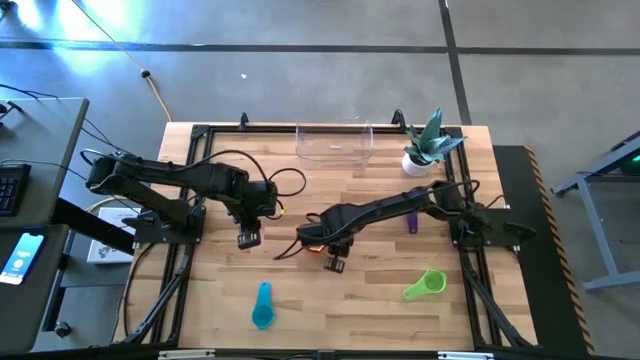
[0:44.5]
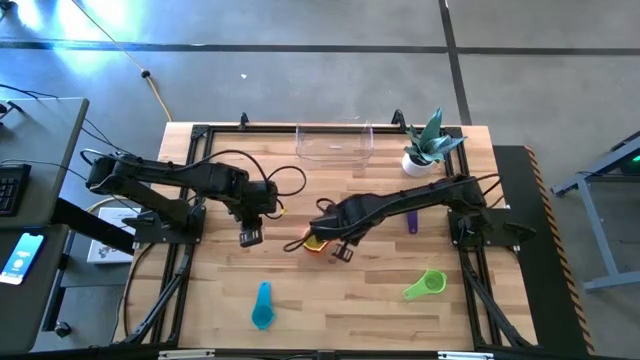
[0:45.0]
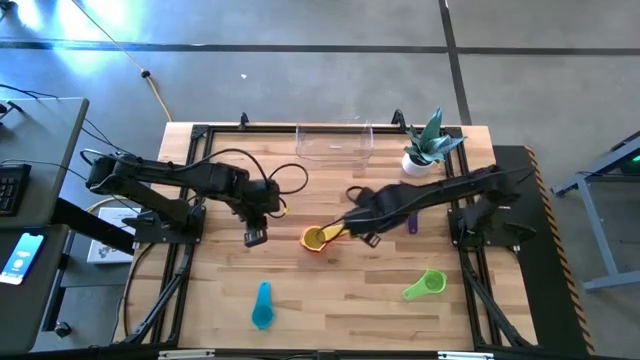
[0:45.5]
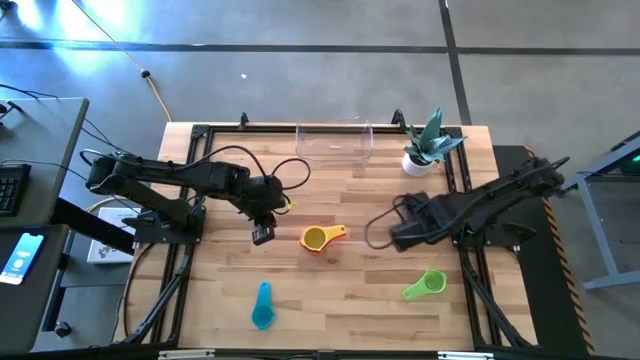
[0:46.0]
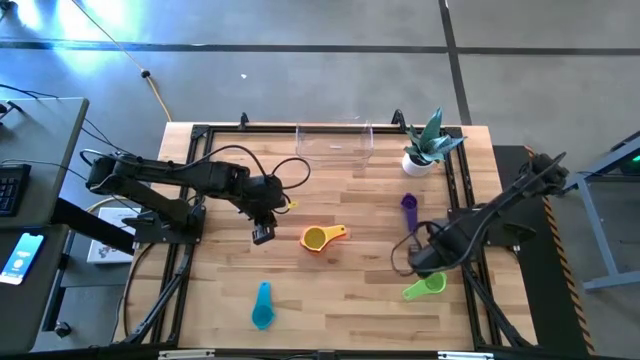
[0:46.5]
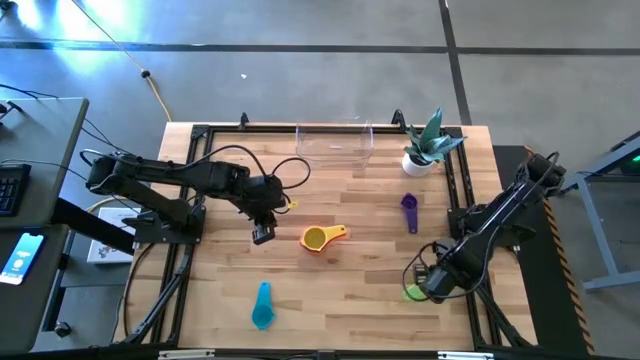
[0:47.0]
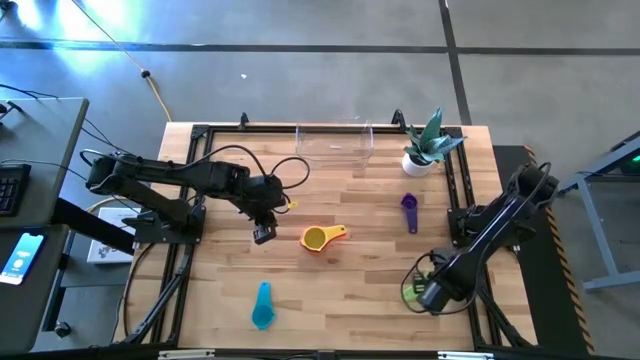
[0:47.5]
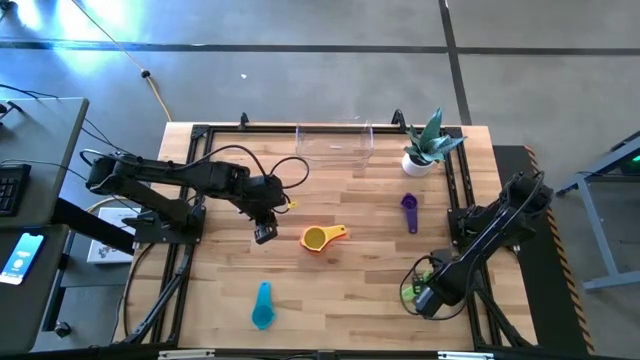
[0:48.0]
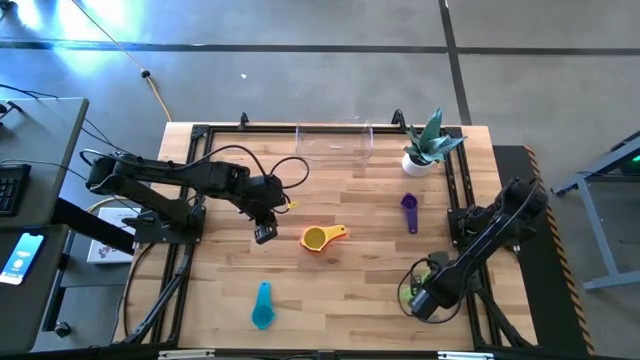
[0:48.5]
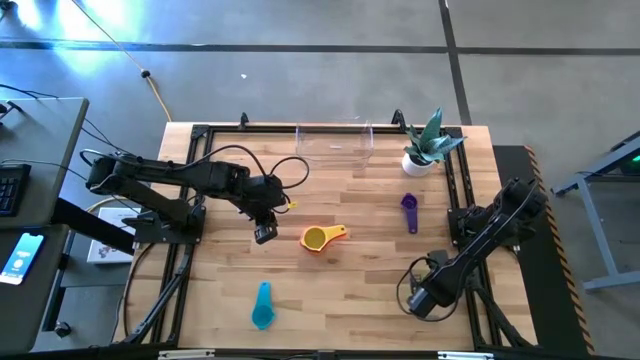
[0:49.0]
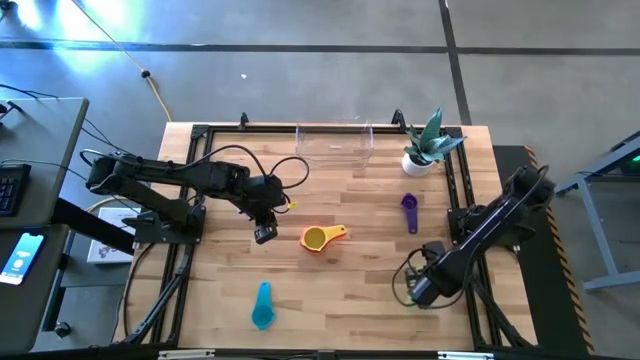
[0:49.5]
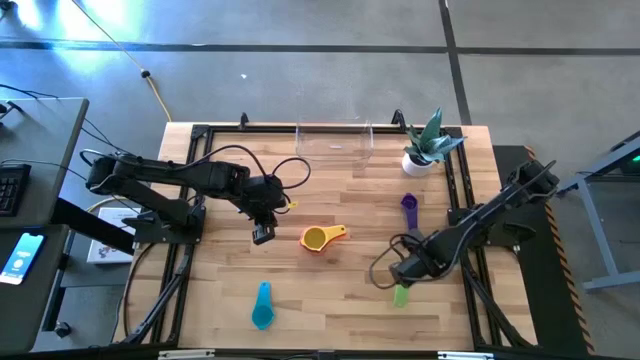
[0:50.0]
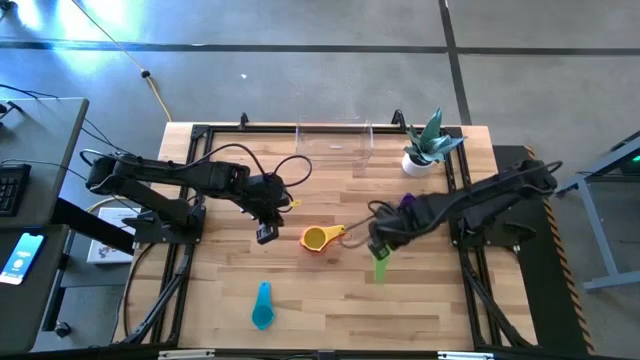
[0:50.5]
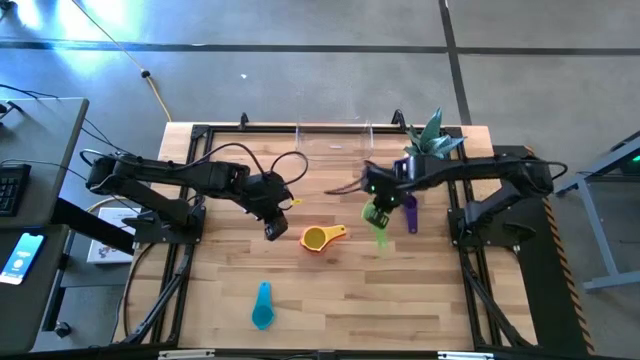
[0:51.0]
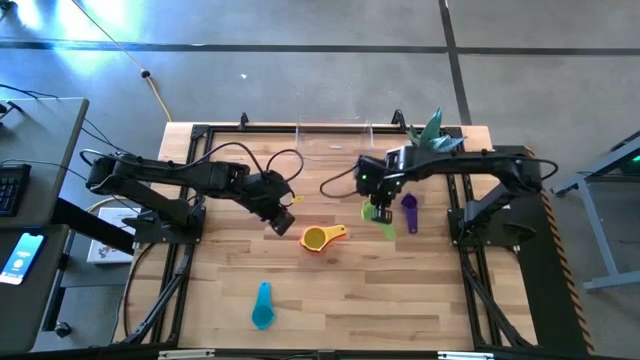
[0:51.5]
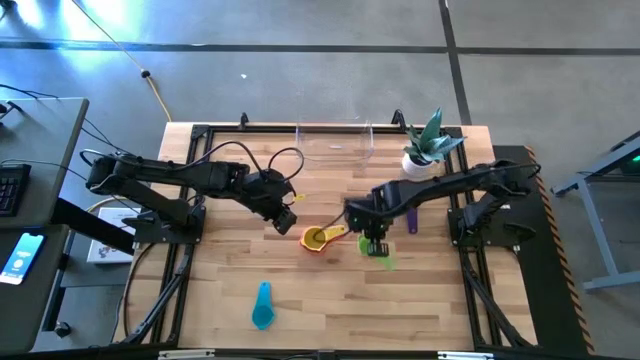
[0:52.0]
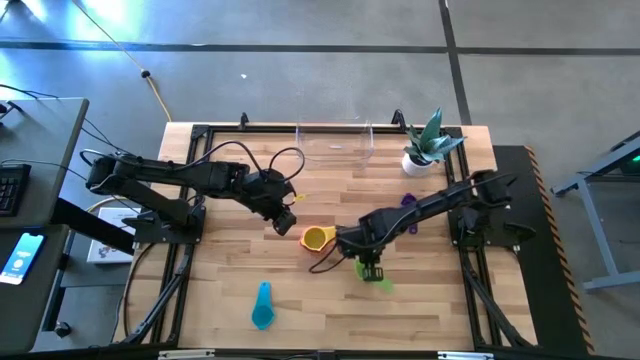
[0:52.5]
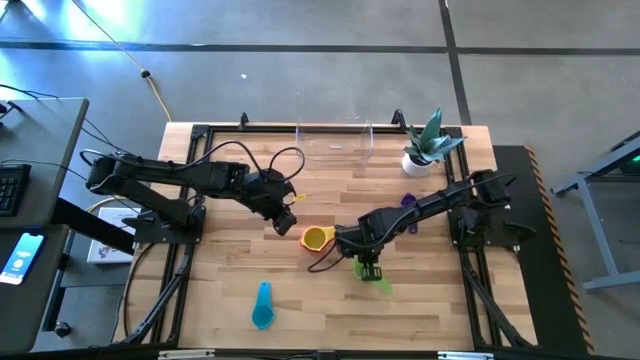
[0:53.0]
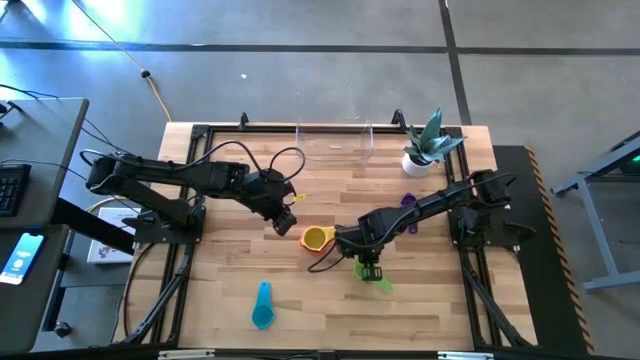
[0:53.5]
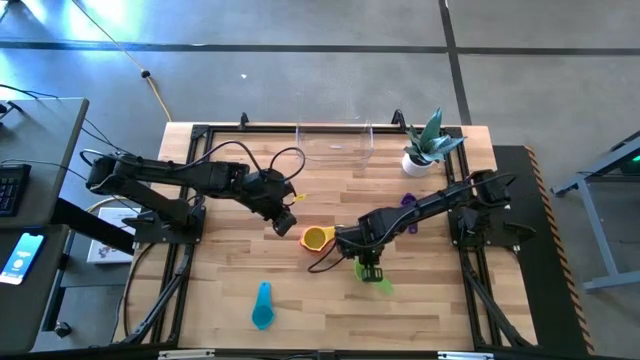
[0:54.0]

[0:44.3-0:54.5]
Task: Nest measuring cups in basket
Move the green measuring cup to the center

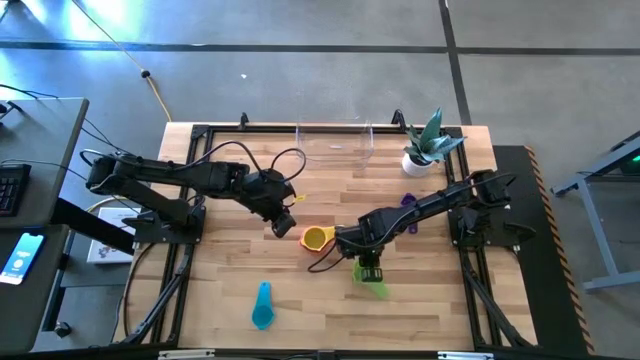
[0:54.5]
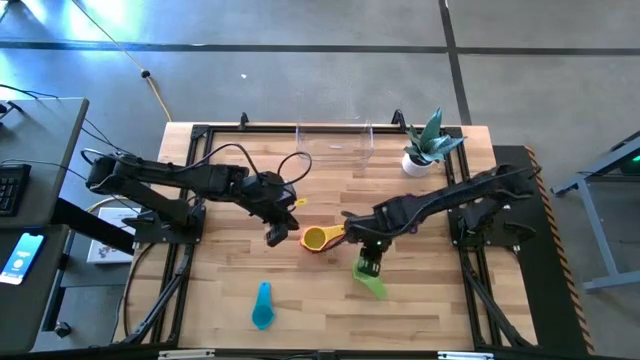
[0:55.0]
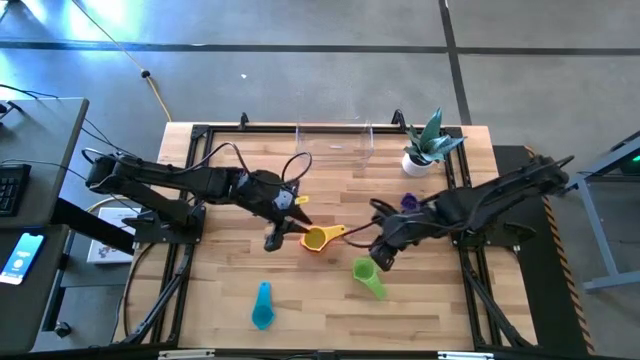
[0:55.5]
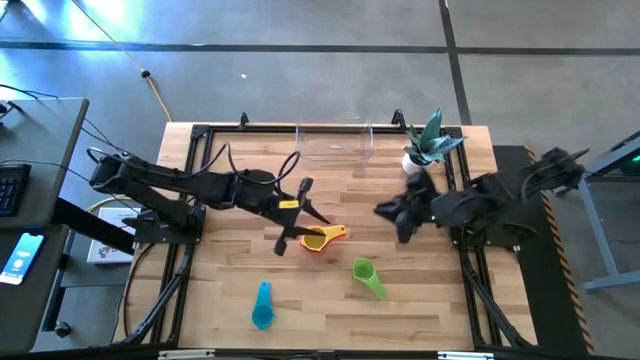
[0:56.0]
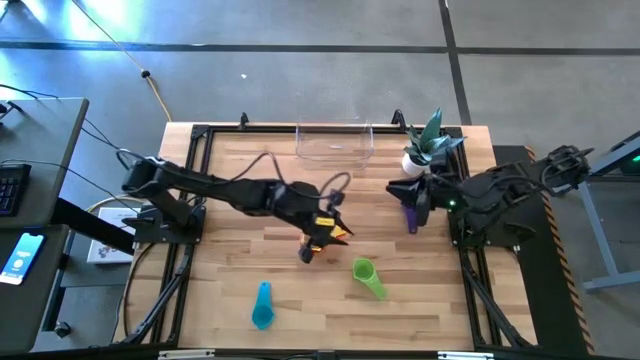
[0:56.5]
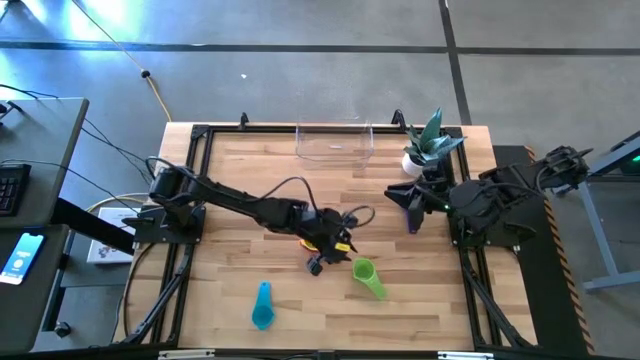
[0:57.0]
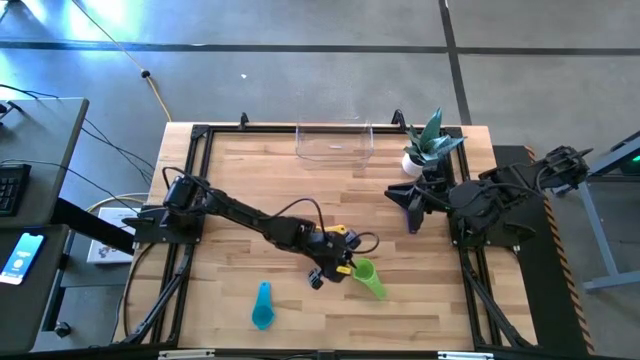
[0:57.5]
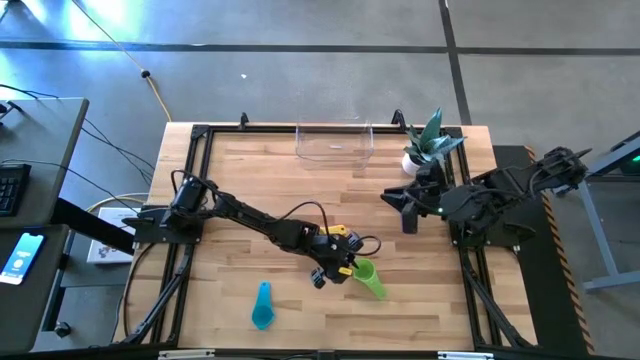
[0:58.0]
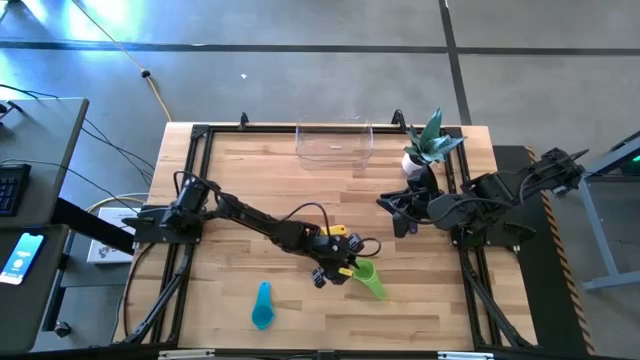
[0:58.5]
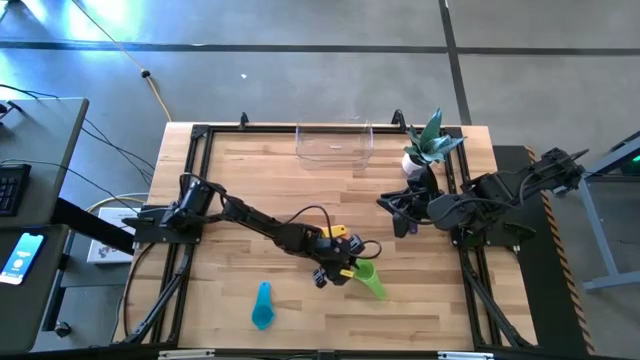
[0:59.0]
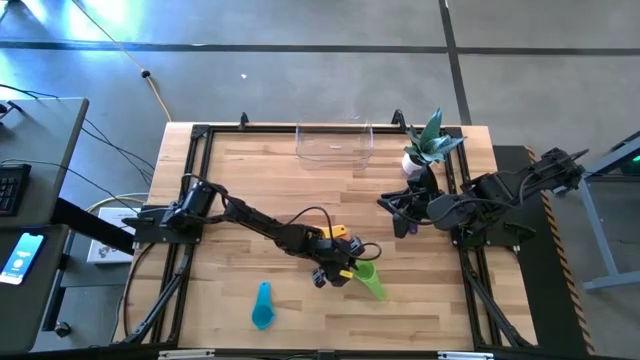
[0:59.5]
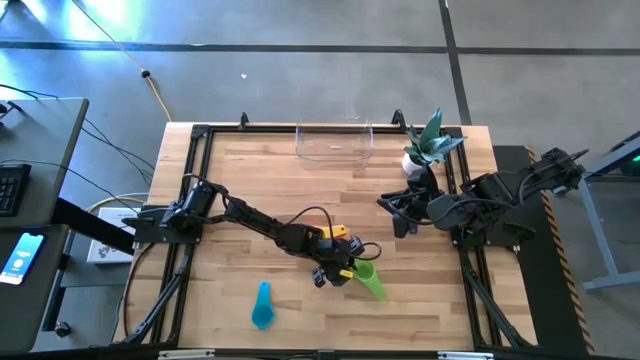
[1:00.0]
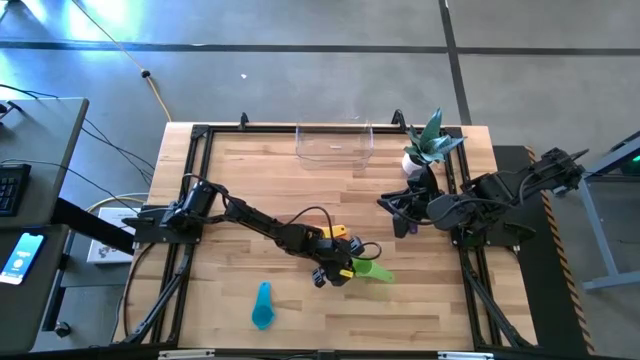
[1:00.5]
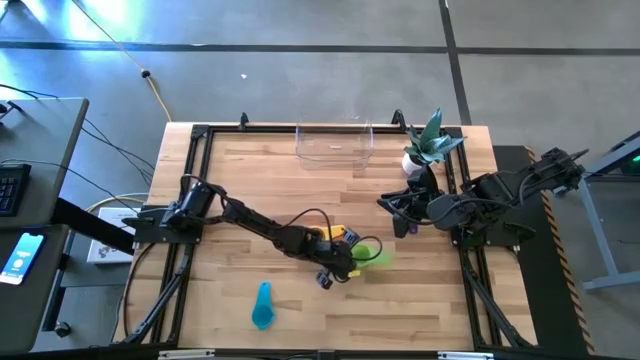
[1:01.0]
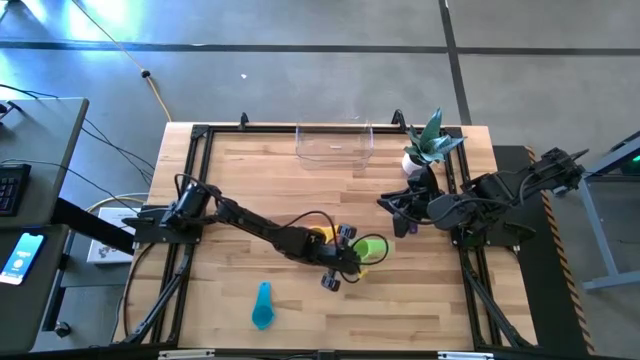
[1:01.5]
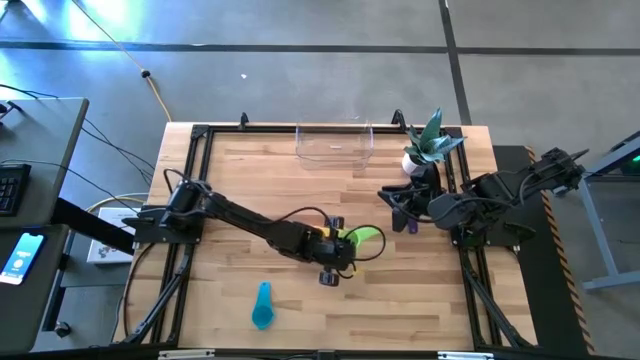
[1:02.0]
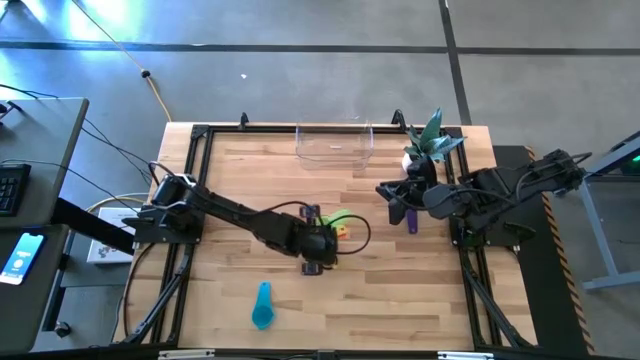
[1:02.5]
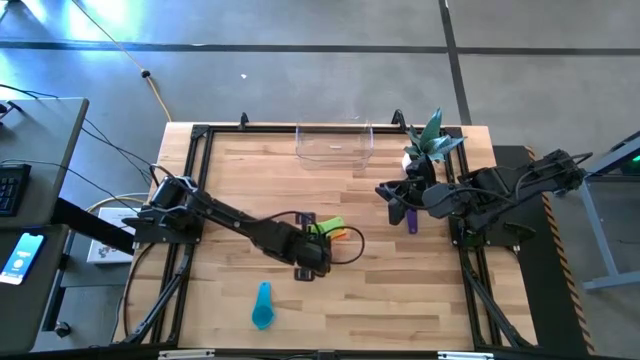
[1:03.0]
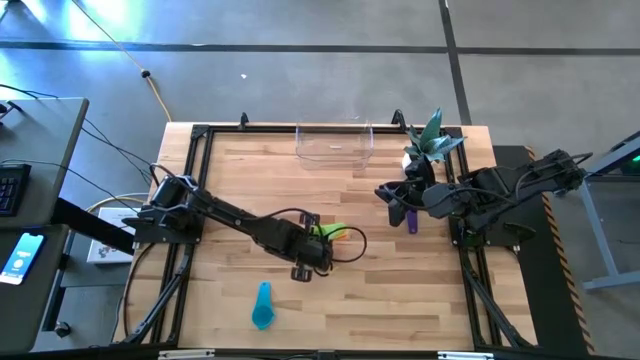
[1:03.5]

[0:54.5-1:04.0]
Stack the green measuring cup on top of the yellow measuring cup

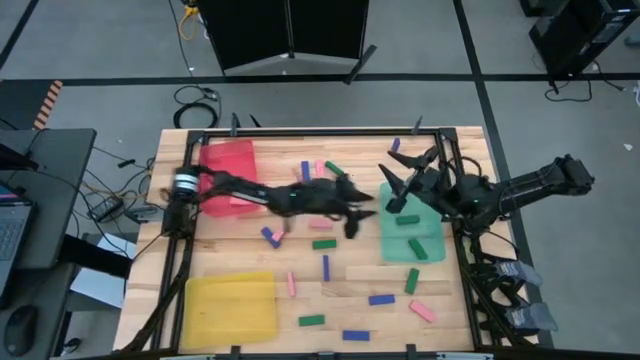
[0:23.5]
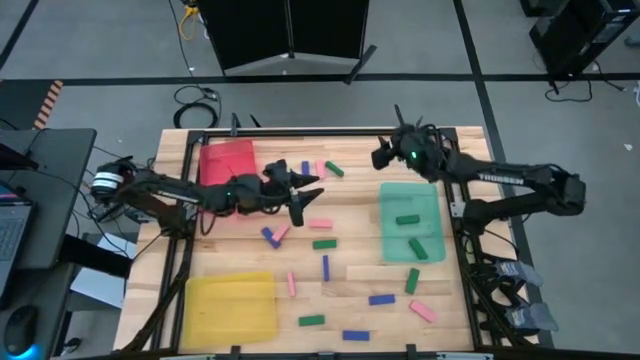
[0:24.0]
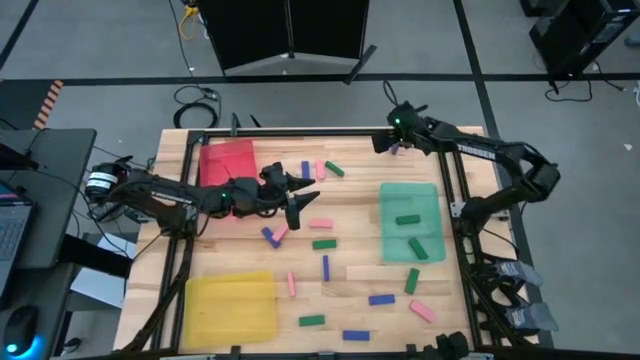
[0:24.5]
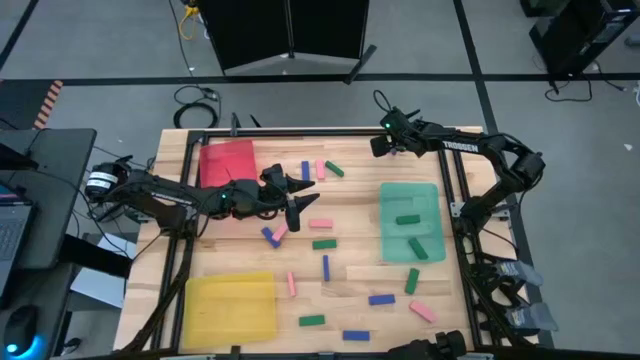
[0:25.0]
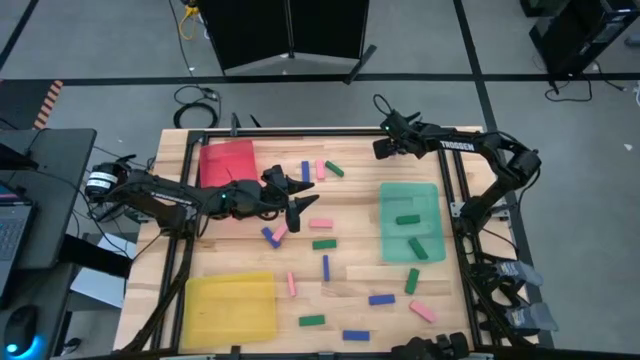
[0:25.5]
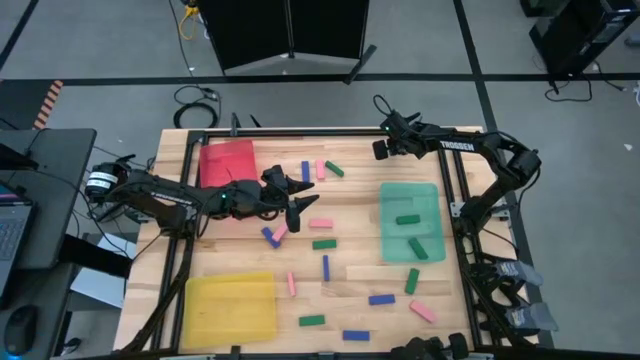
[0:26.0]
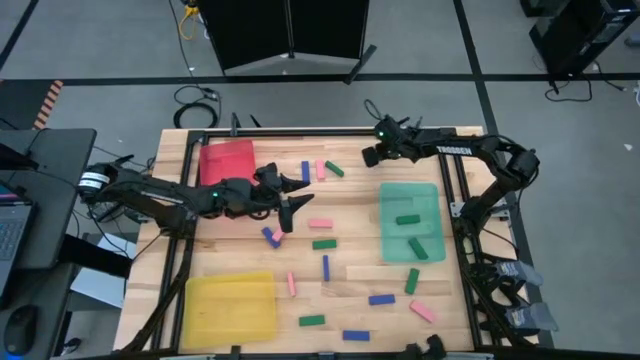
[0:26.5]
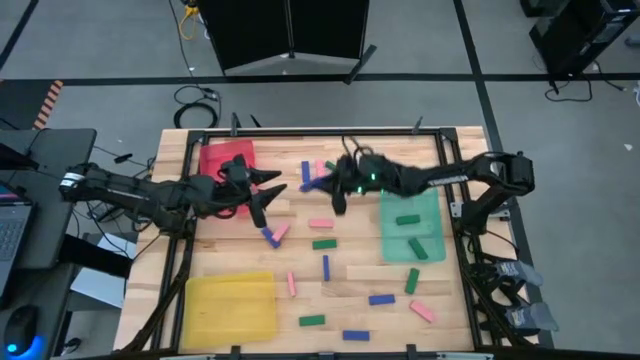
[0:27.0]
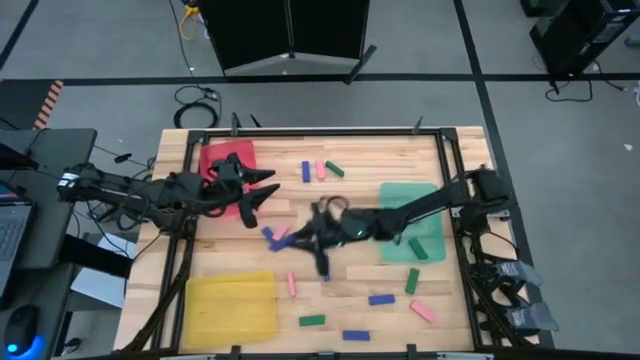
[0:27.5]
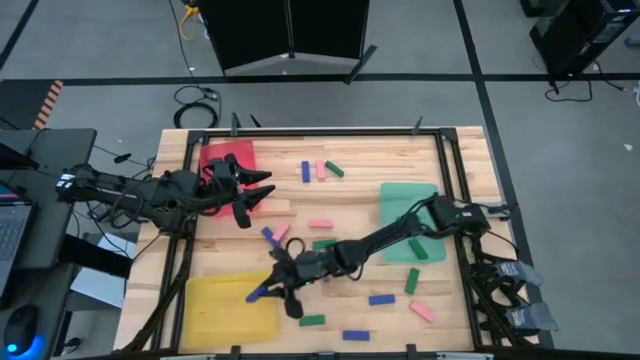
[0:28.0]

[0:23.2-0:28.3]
Task: Sort blocks
Put the blue block into the yellow bin
